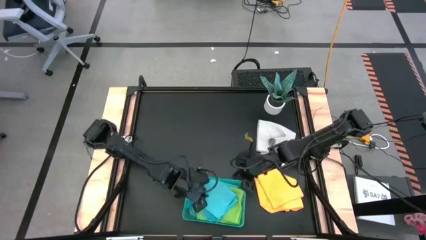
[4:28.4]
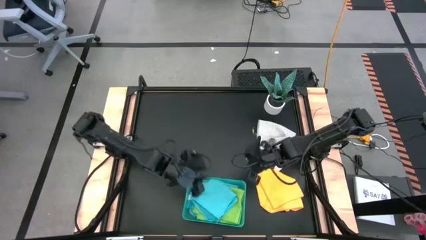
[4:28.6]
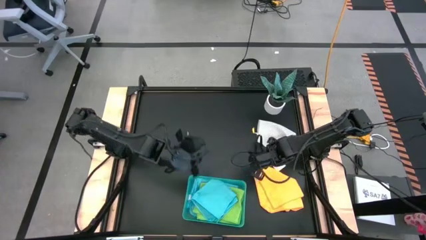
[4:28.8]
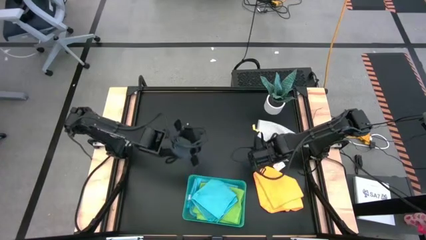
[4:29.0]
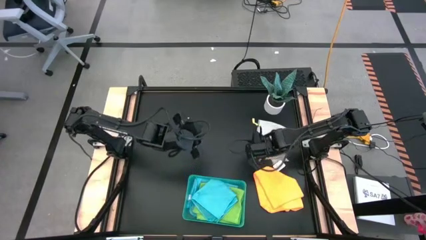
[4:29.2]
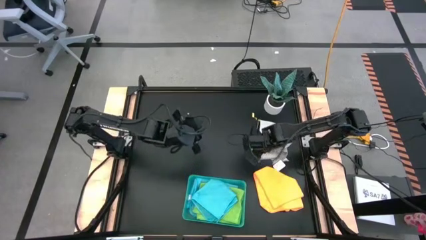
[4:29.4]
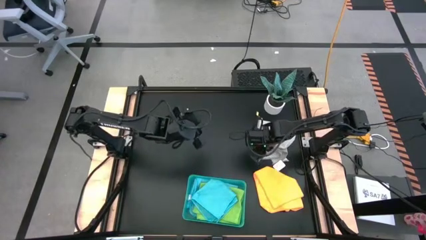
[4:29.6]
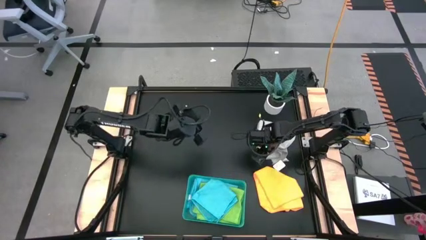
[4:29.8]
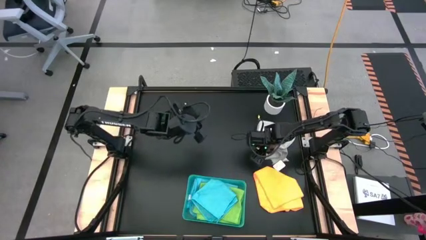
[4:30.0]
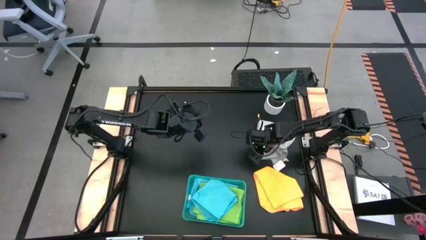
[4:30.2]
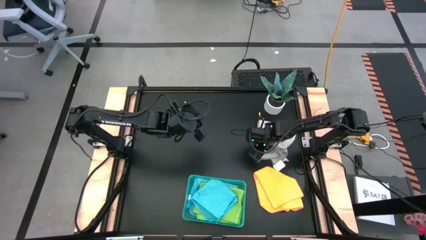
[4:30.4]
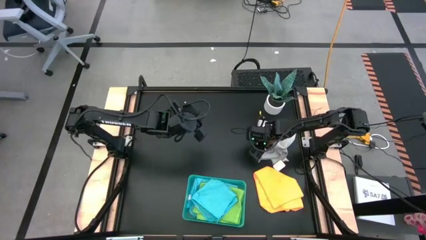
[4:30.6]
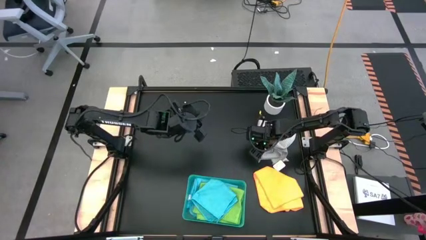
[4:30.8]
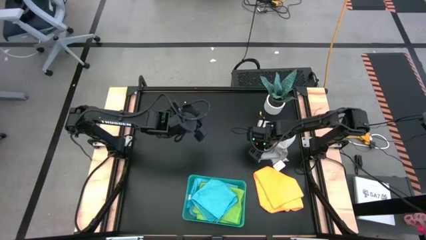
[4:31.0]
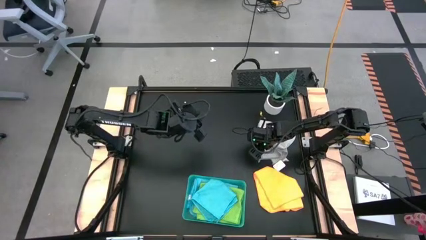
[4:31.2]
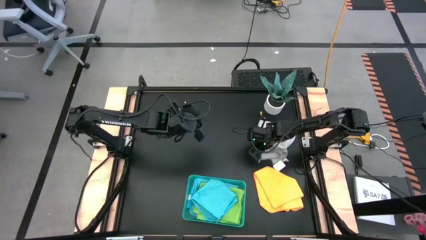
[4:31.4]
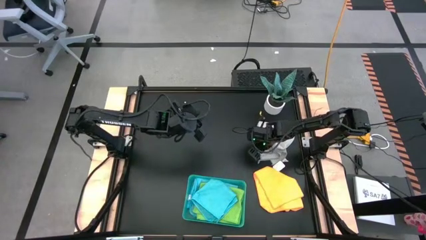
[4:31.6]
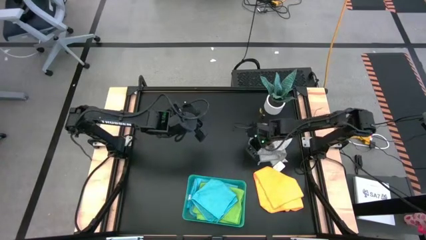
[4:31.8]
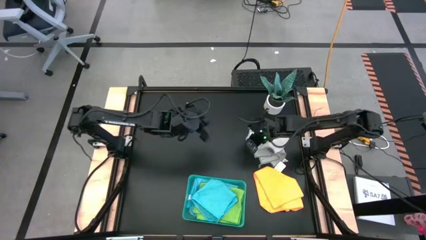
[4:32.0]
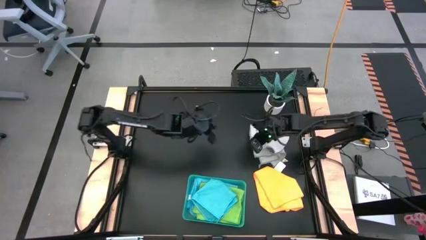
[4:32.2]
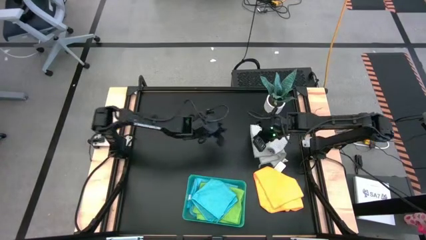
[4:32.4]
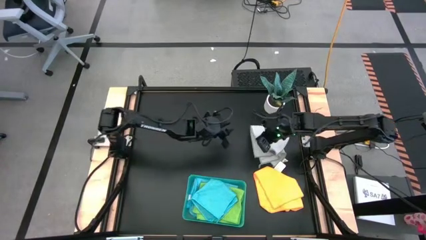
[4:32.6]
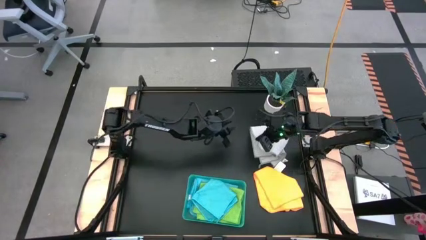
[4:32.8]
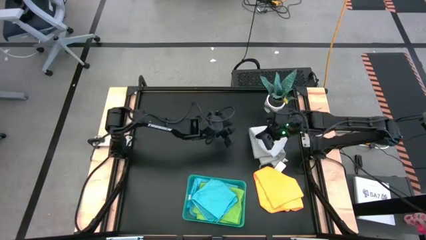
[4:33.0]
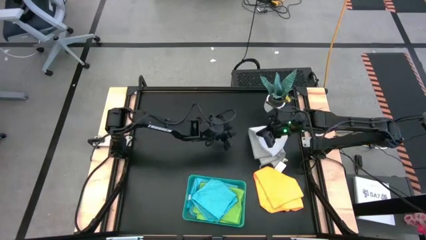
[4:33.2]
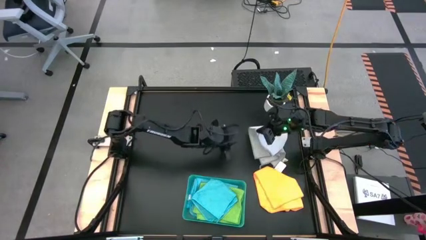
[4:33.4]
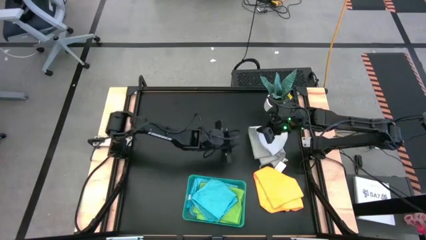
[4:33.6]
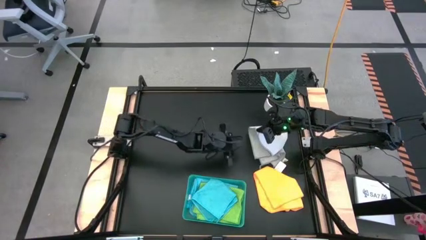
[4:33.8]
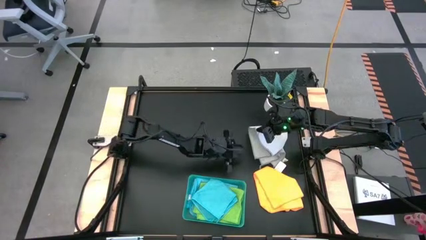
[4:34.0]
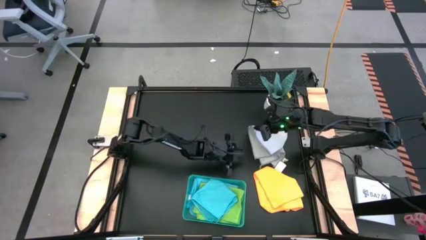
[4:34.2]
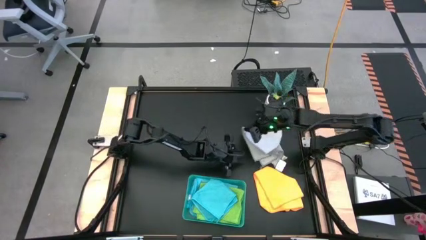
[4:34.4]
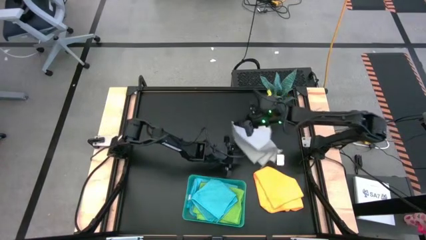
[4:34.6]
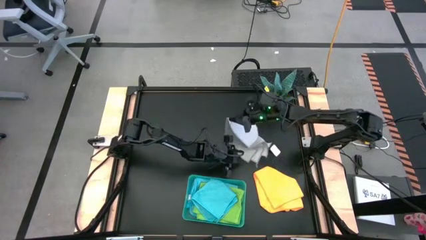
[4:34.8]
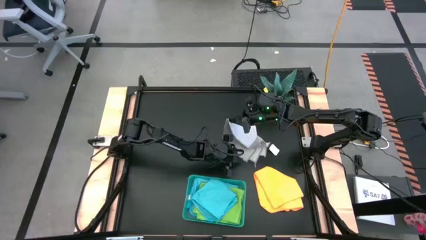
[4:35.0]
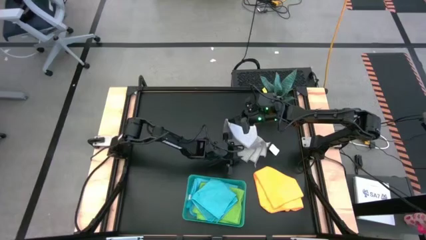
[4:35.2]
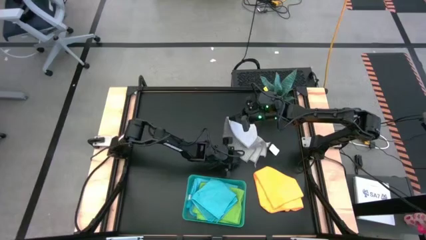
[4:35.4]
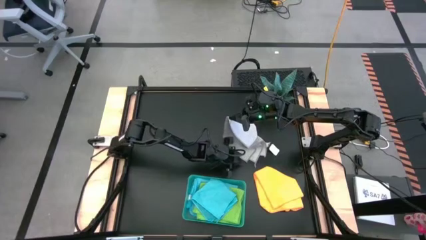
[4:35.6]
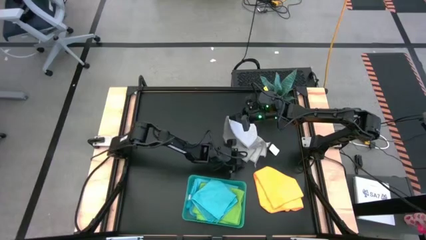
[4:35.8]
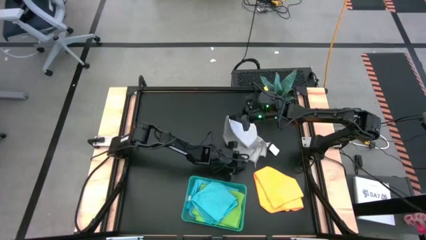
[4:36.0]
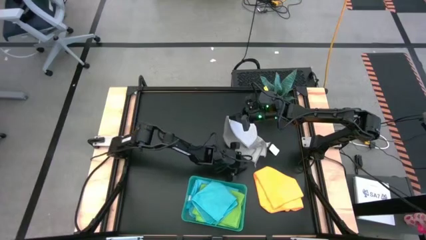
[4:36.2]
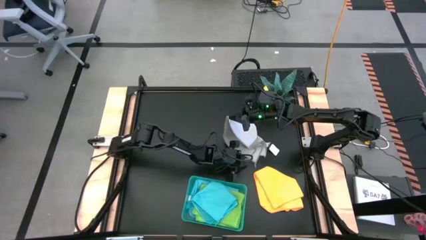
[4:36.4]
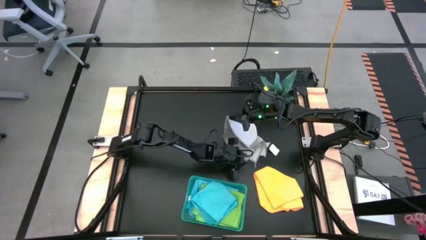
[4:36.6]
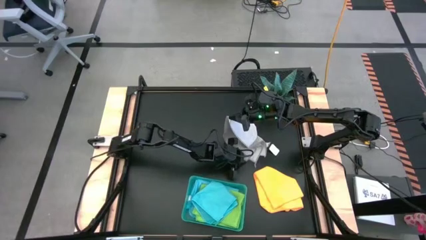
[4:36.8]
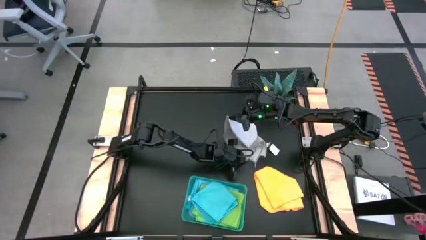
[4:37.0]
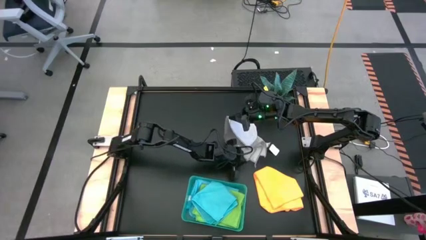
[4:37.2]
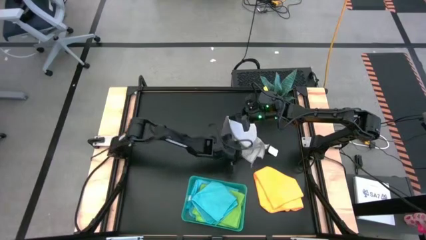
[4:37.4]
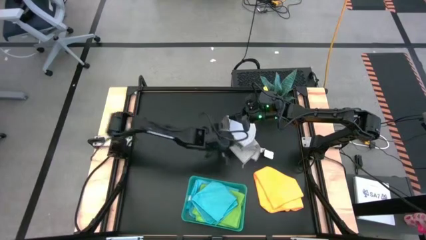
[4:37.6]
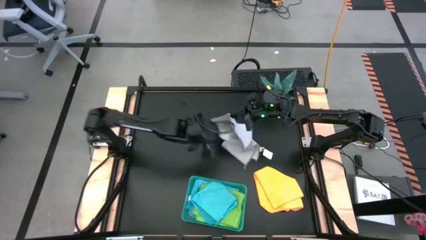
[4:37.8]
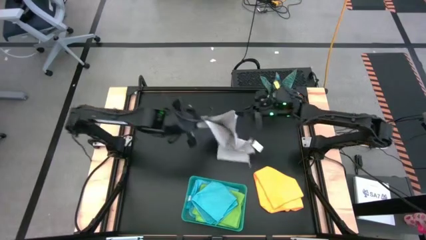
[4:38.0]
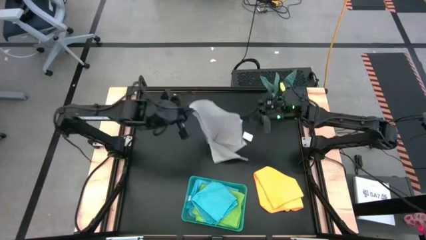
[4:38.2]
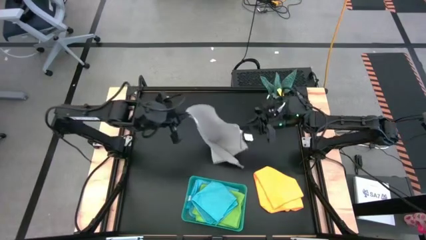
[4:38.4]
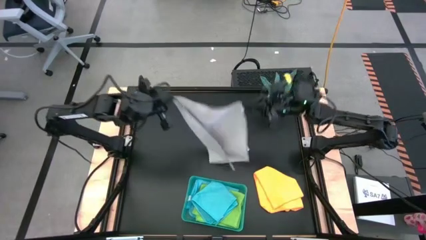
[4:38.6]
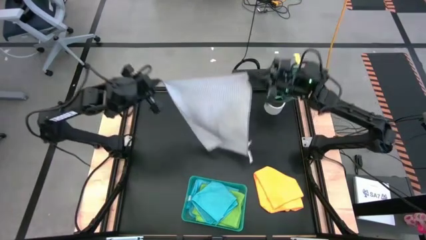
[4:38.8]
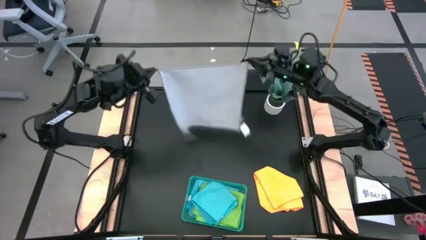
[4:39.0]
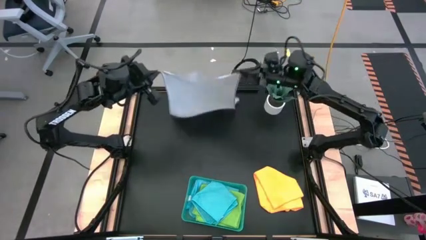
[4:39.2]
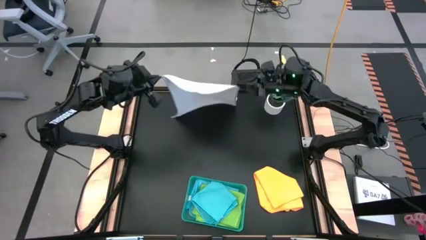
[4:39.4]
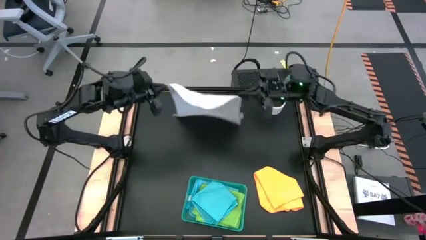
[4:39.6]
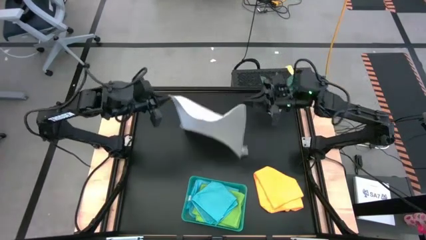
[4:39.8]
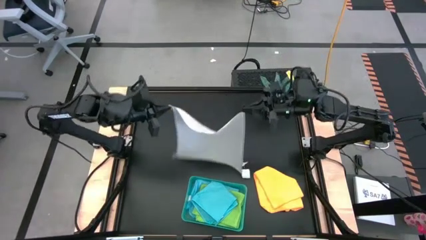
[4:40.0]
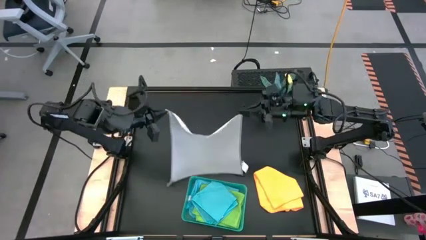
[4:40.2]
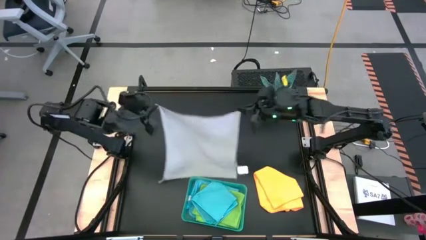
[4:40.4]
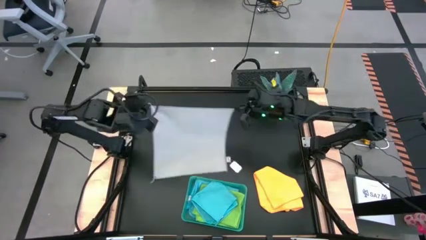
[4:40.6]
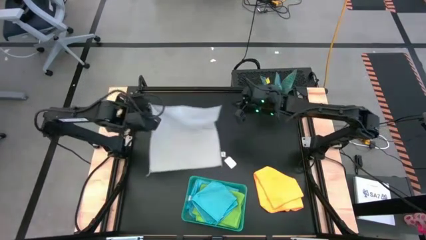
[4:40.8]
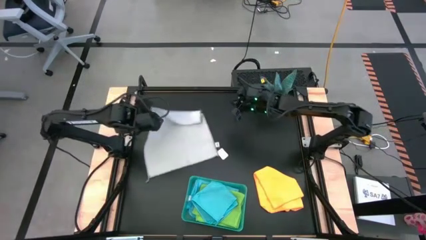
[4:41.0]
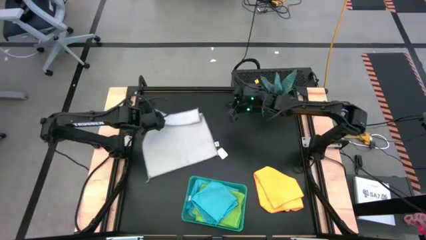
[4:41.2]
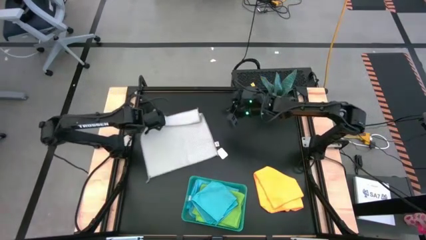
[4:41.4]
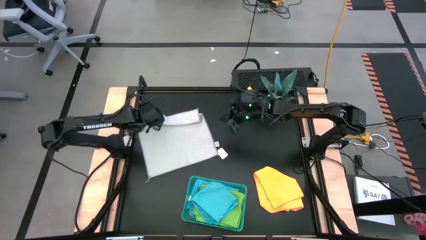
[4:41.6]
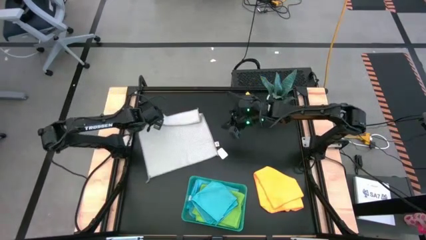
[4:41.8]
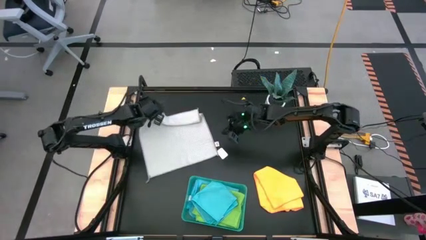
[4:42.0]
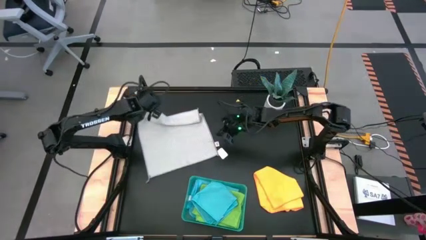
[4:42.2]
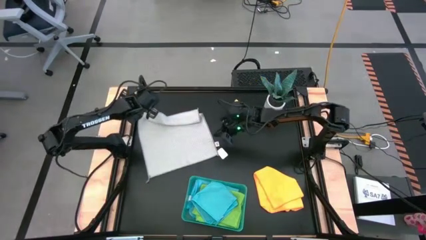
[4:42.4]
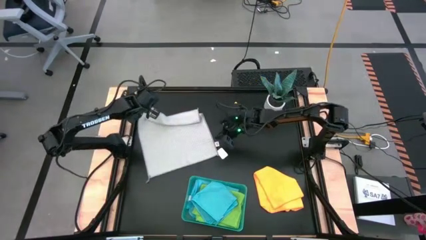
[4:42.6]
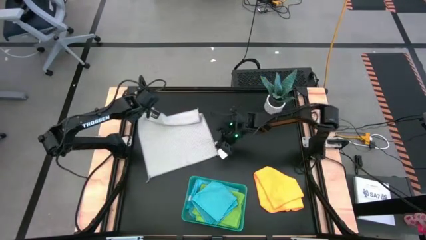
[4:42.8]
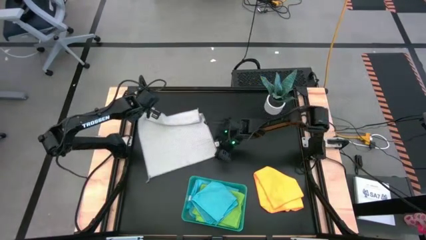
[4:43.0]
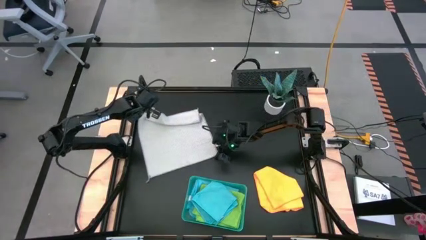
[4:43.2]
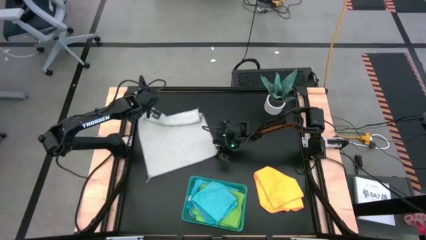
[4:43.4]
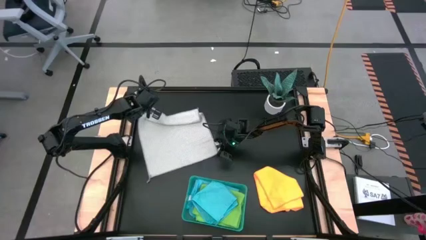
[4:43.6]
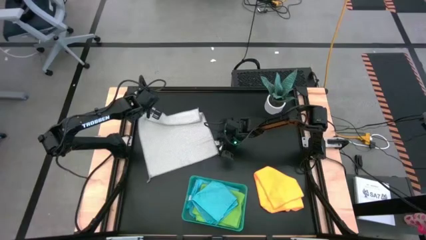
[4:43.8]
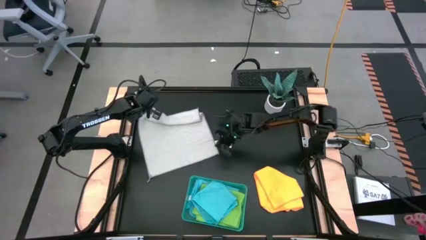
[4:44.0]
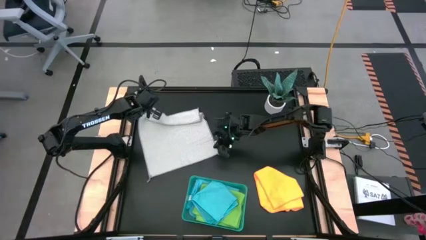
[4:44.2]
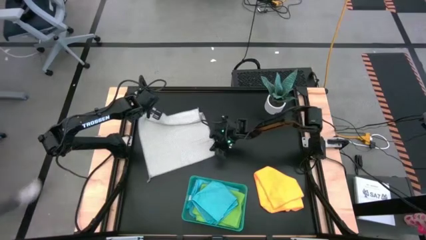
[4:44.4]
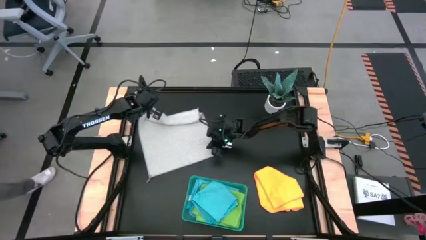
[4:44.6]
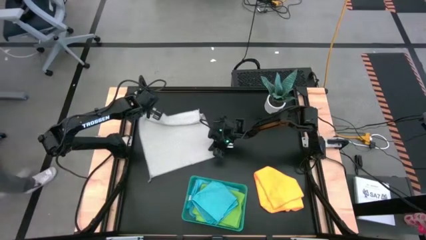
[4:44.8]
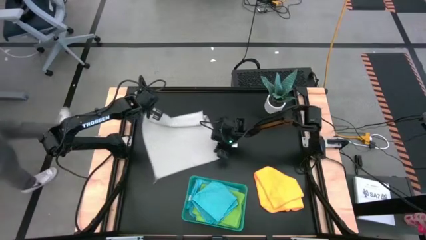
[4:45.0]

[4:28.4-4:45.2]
Task: Fold microfiber towels
Fold the gray microfiber cloth
